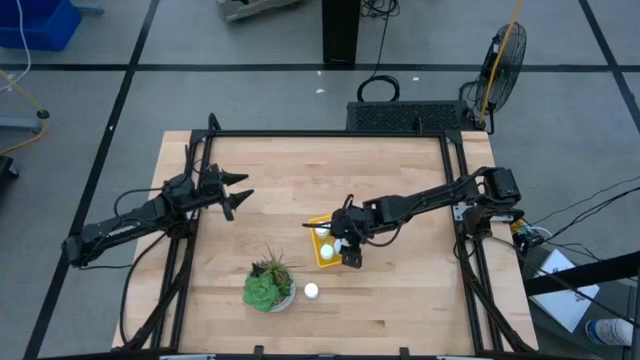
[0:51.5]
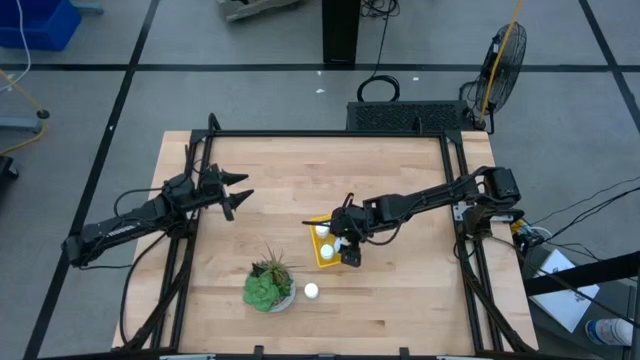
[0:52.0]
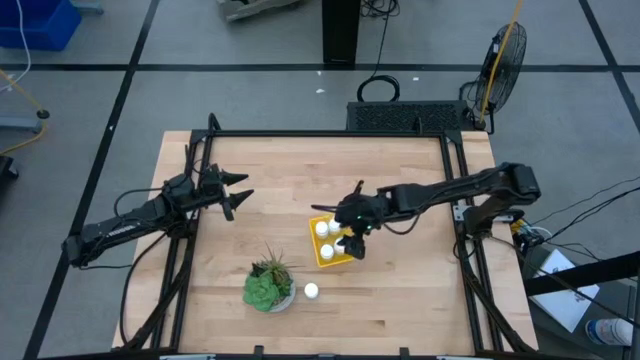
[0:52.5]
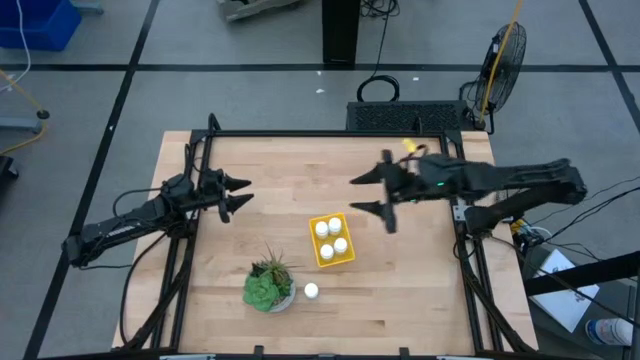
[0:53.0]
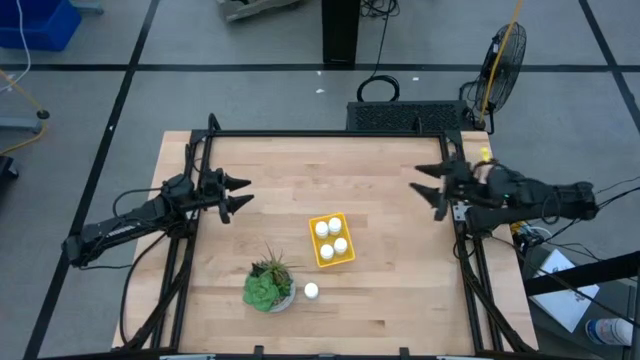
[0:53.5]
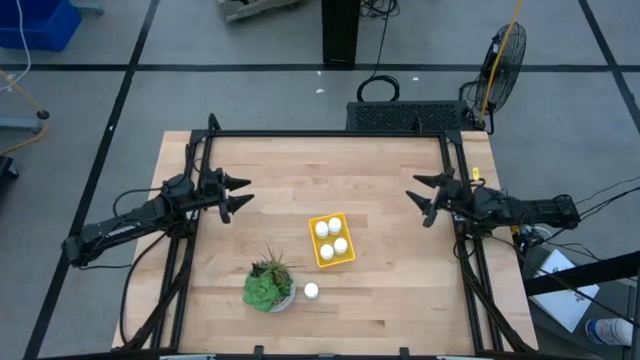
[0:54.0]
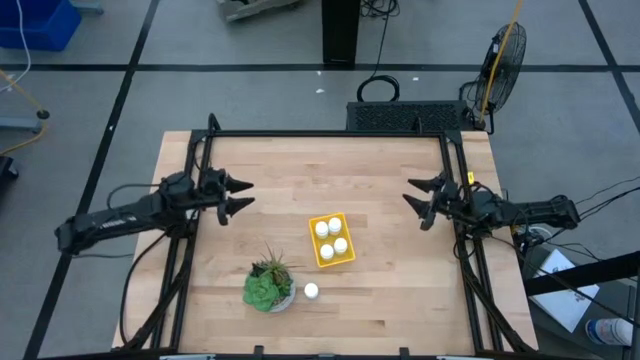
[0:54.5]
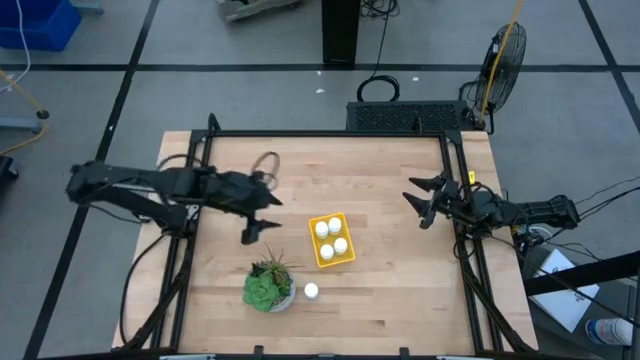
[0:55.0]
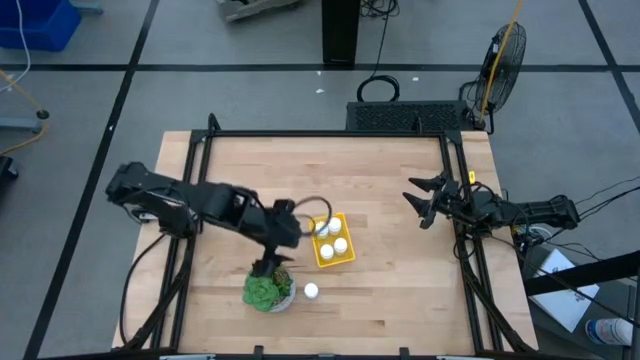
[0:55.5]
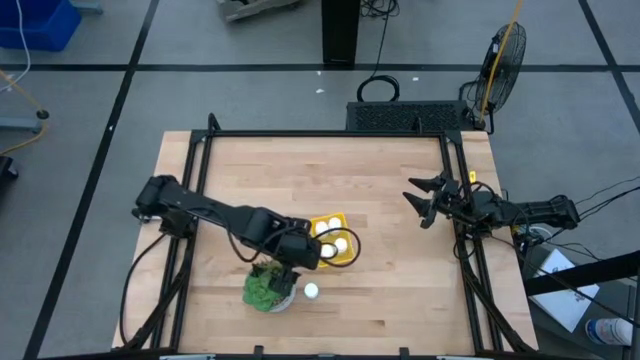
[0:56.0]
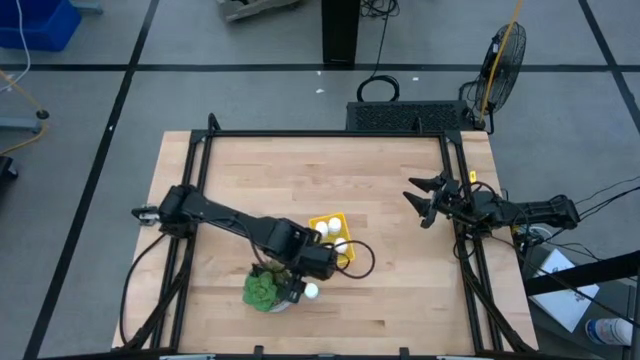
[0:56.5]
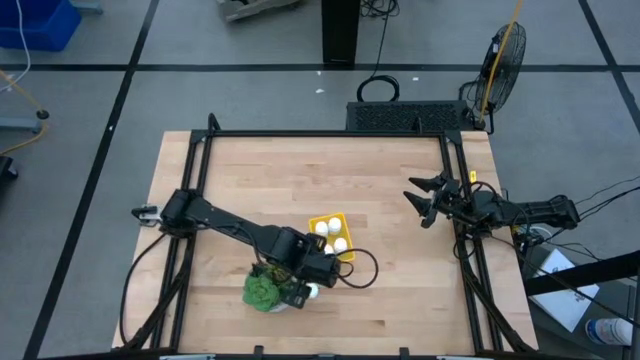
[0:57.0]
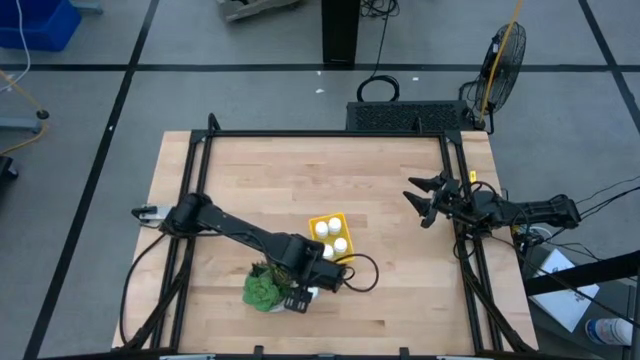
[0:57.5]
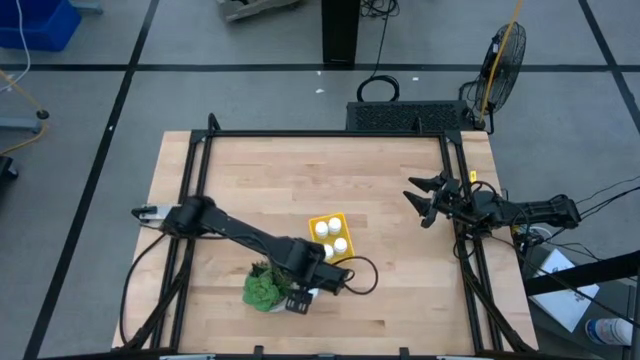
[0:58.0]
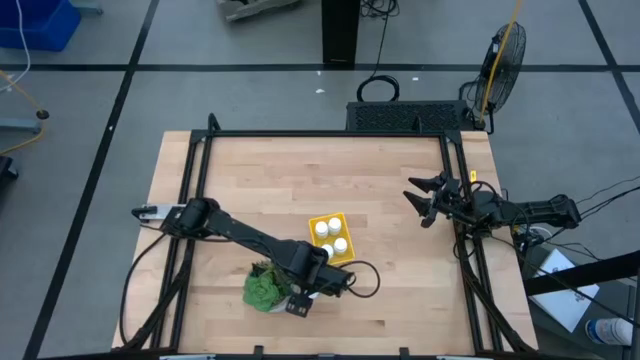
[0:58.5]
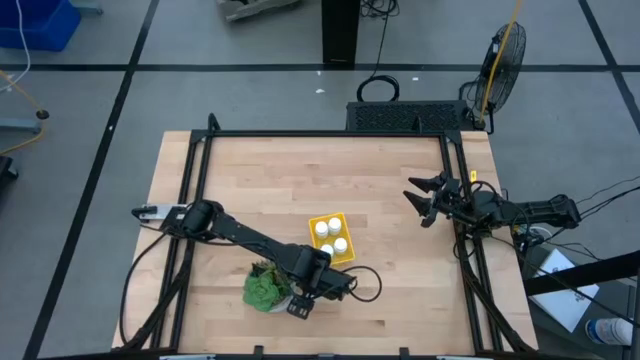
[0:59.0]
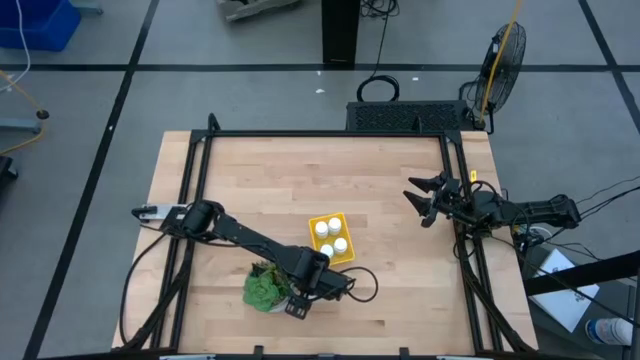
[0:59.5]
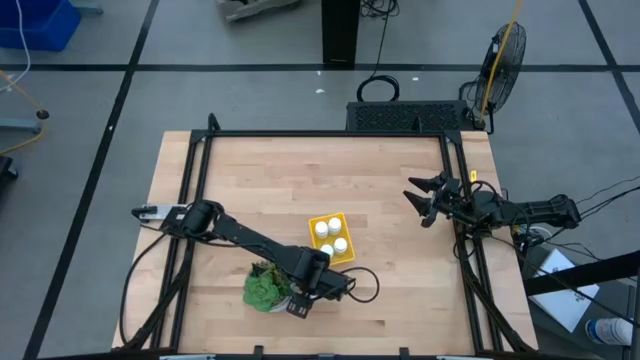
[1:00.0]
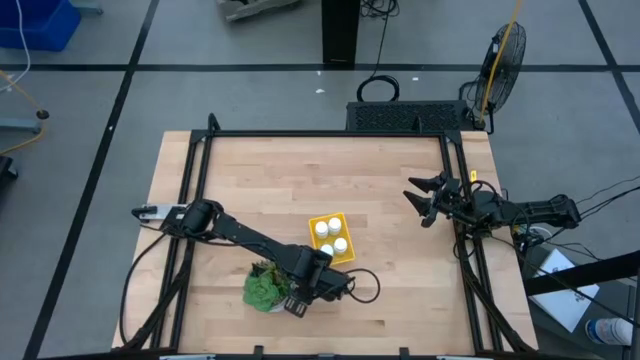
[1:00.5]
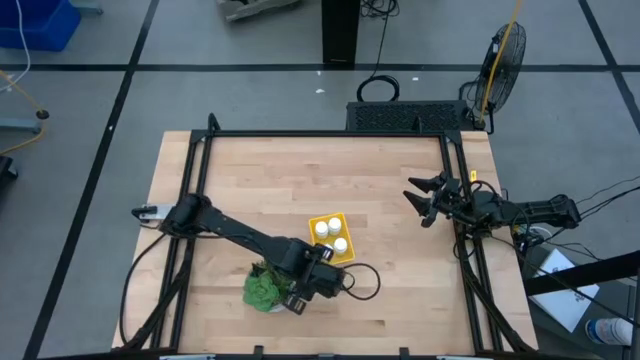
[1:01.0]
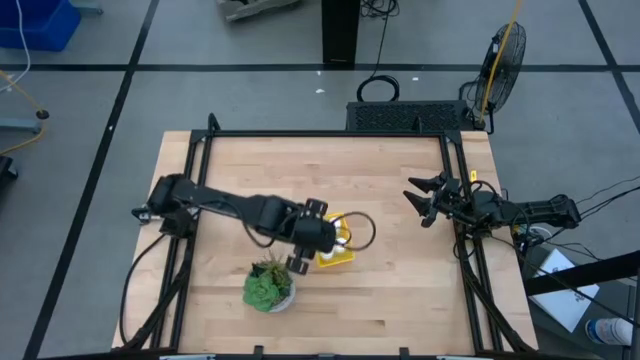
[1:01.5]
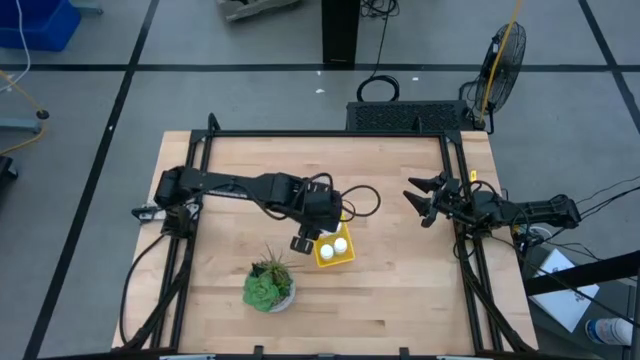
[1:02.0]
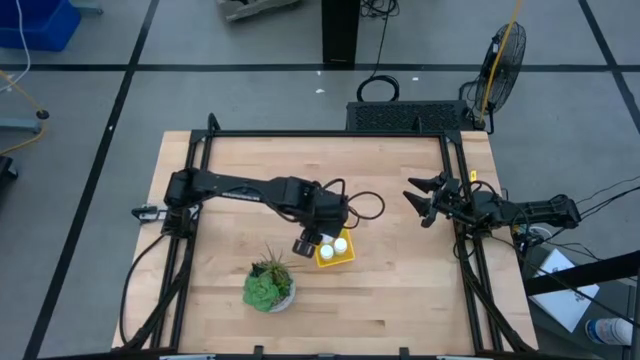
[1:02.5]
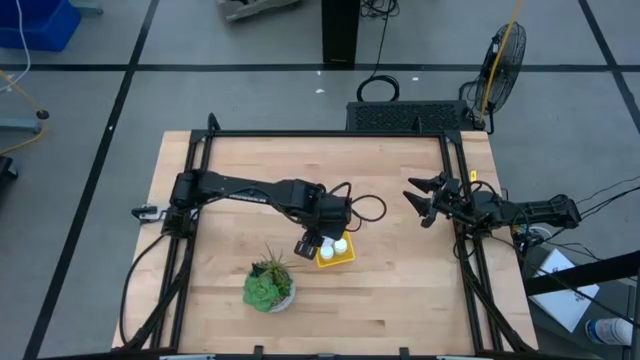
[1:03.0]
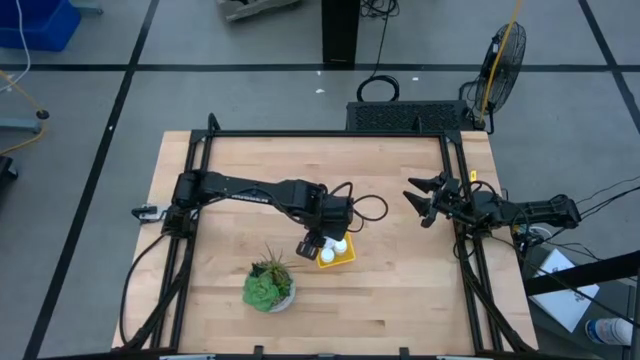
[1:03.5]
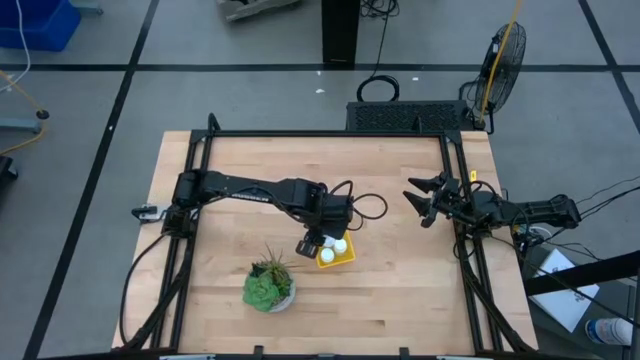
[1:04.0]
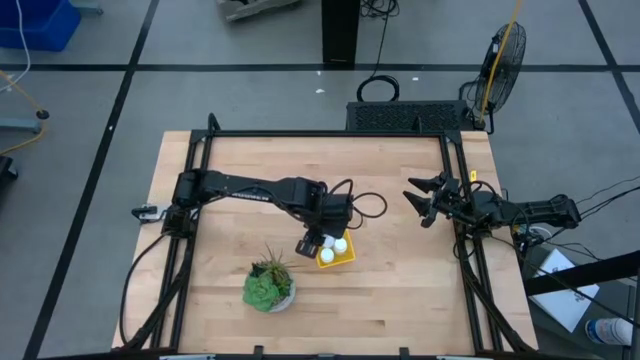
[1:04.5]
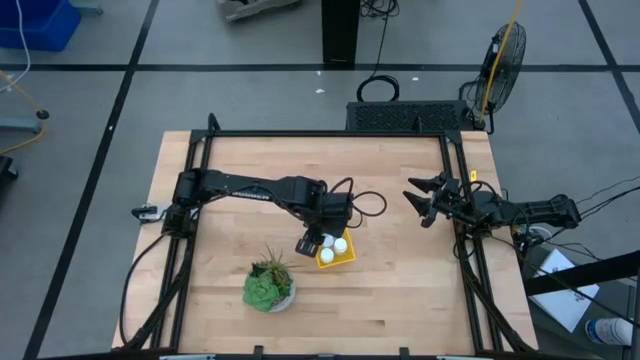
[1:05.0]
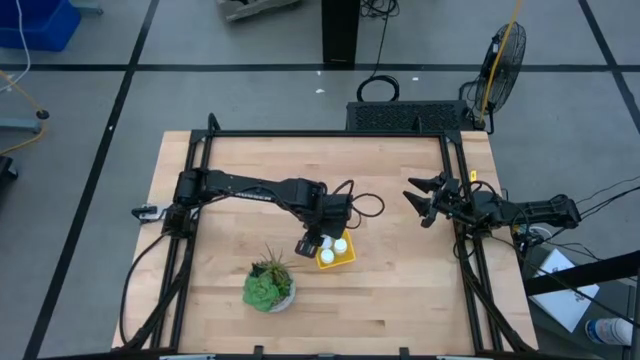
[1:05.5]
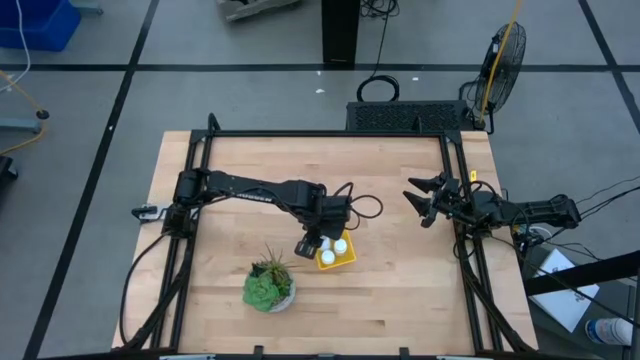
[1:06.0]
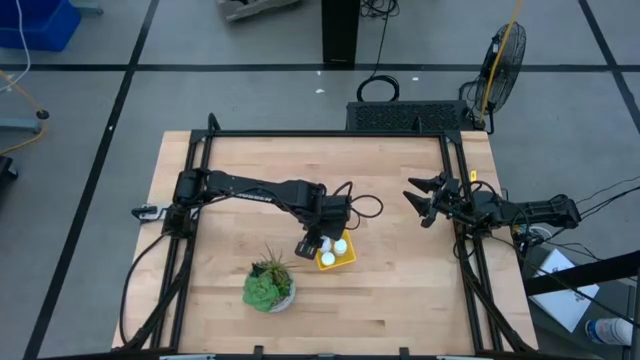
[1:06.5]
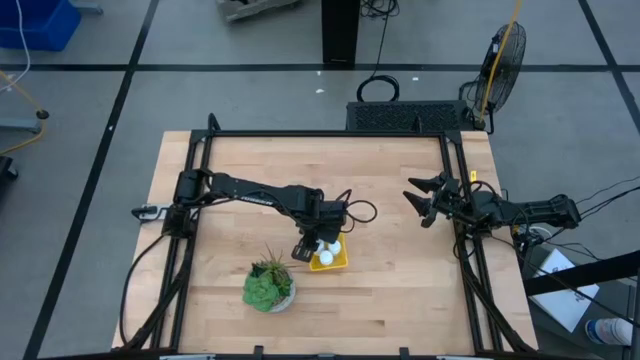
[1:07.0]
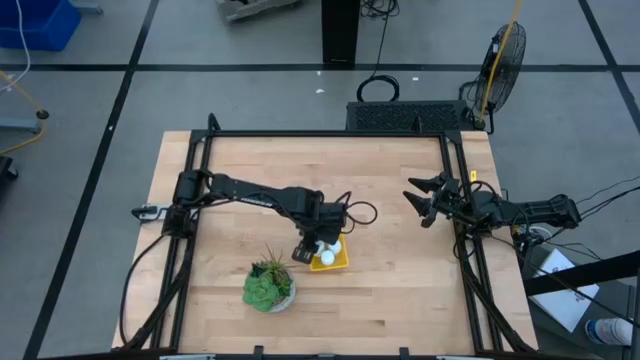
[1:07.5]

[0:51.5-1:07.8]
Task: Pick and place pill bottles into a basket
Put the white pill bottle into the yellow bin

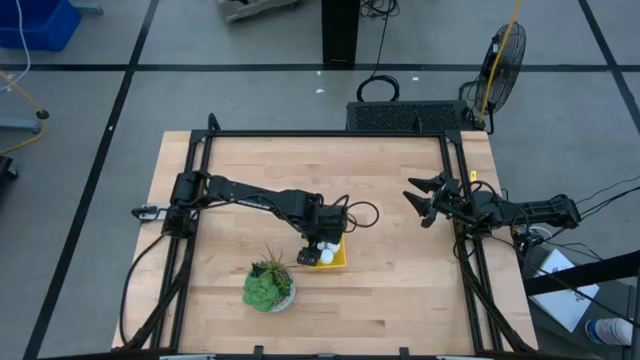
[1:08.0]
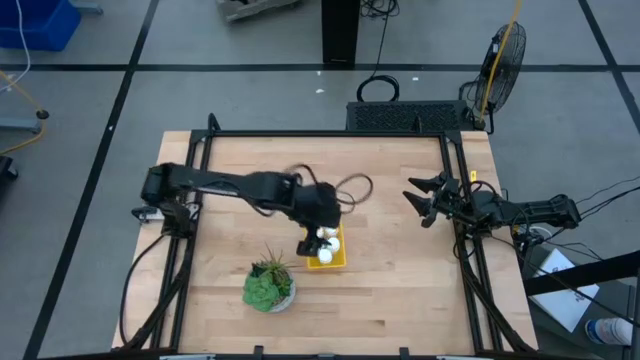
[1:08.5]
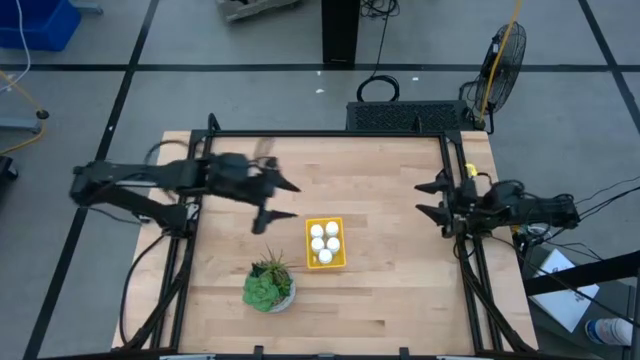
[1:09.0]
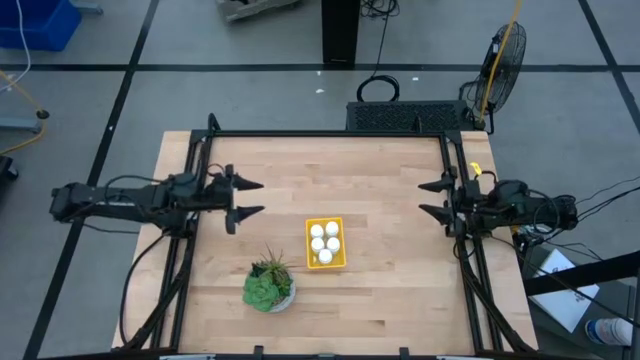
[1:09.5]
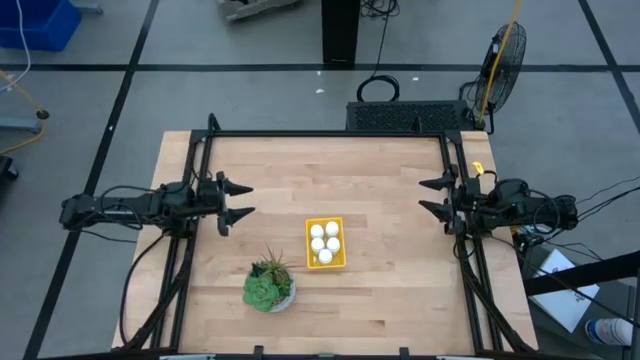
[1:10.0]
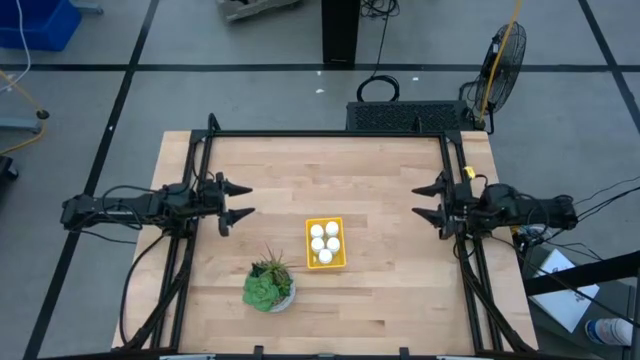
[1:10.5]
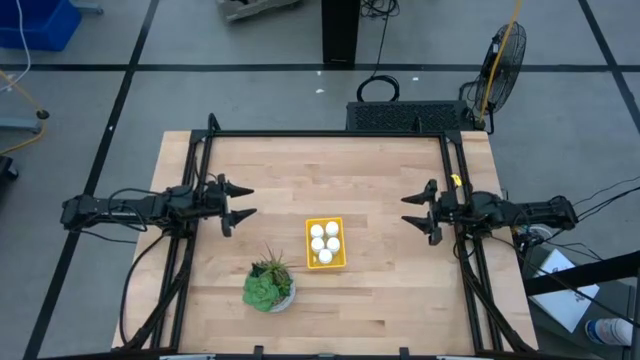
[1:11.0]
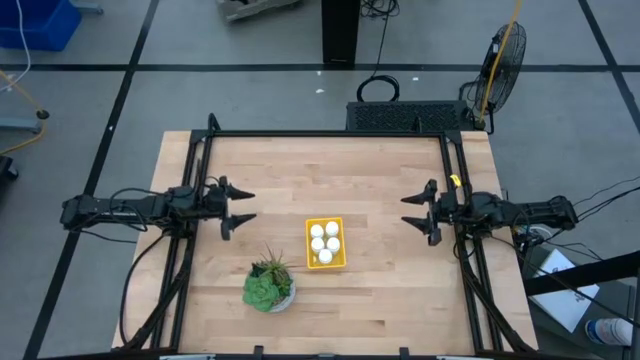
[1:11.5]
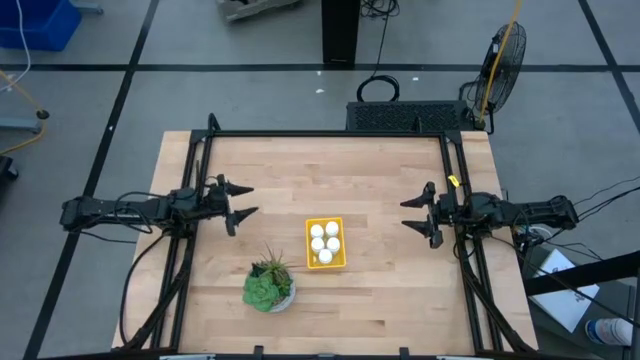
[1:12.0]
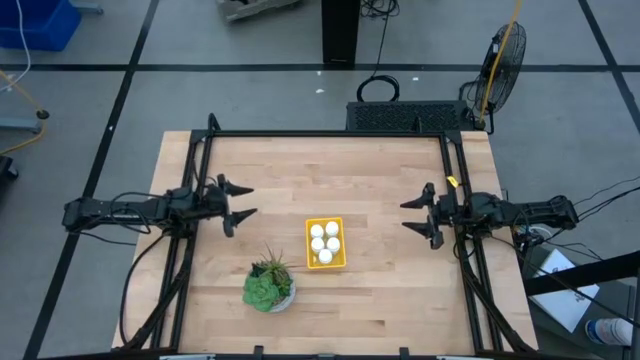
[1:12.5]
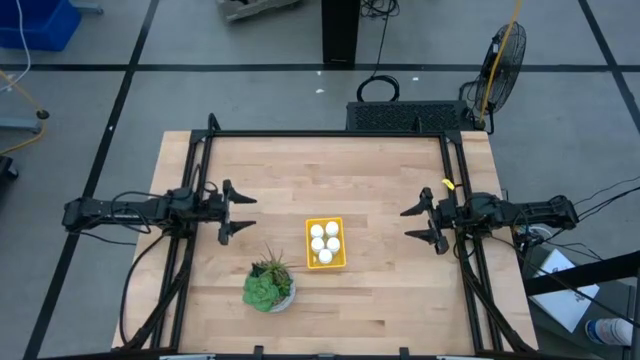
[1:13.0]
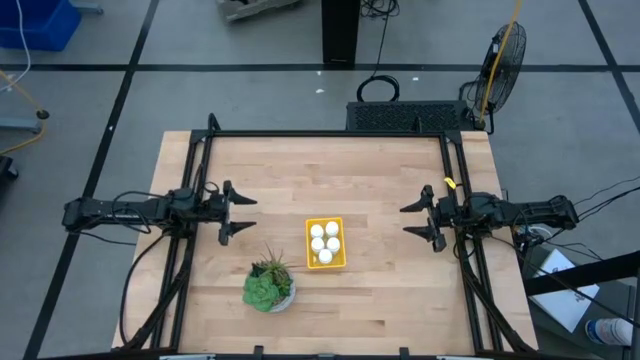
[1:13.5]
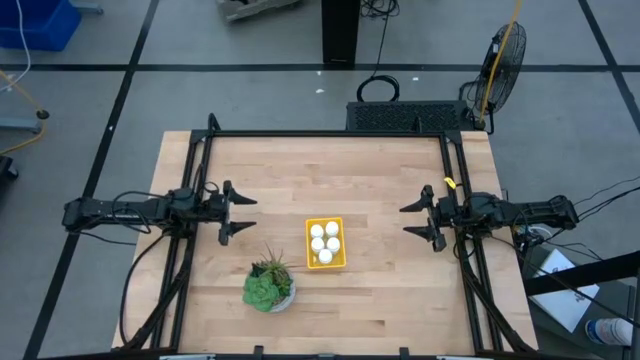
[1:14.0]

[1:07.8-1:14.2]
Return to Home Position
